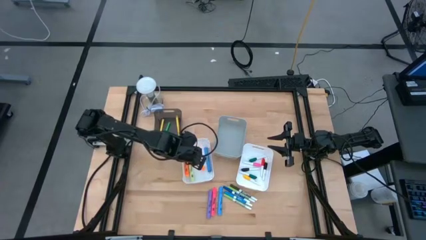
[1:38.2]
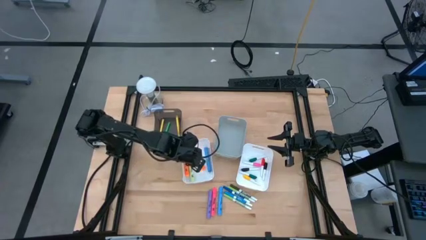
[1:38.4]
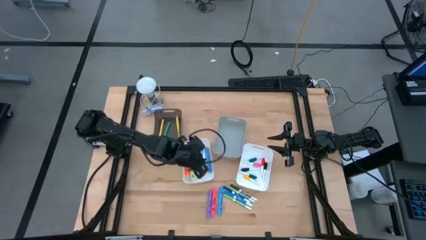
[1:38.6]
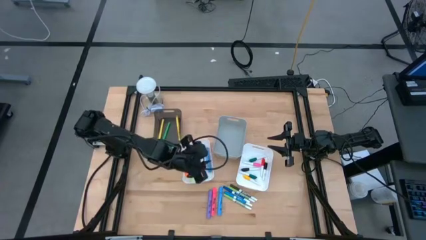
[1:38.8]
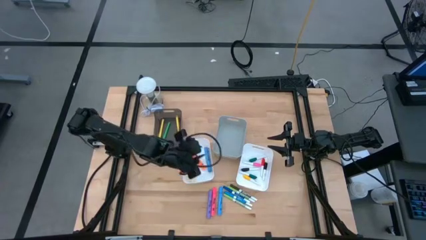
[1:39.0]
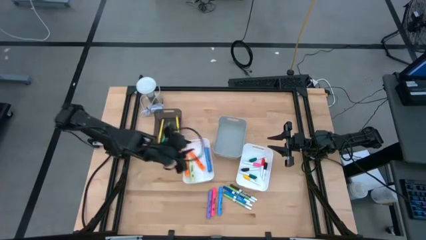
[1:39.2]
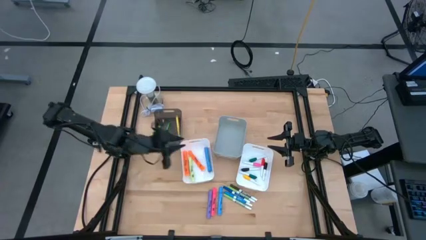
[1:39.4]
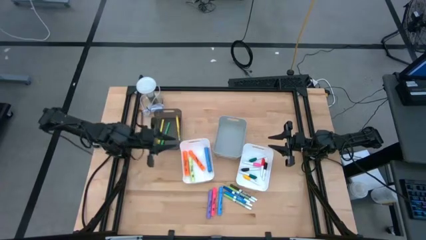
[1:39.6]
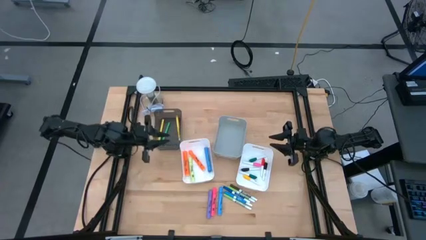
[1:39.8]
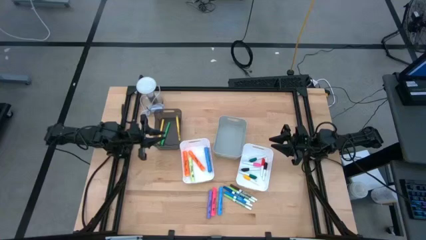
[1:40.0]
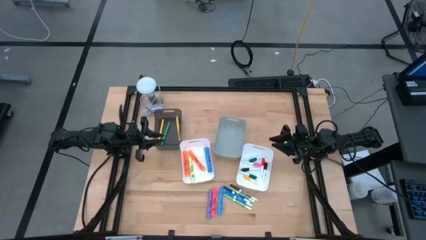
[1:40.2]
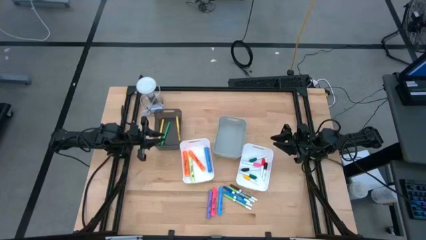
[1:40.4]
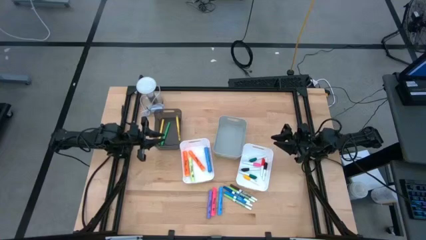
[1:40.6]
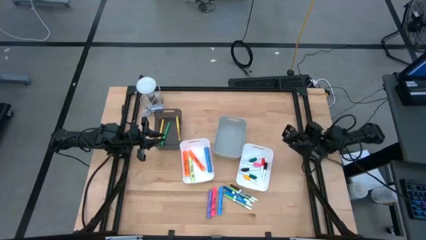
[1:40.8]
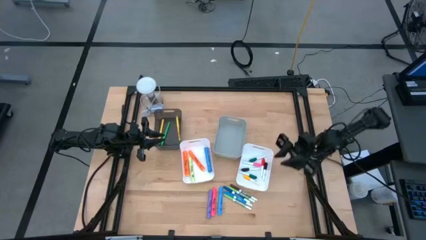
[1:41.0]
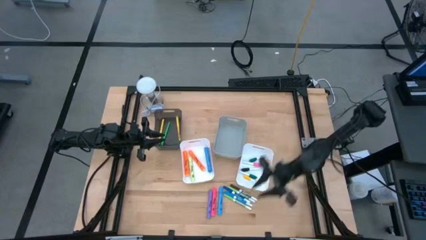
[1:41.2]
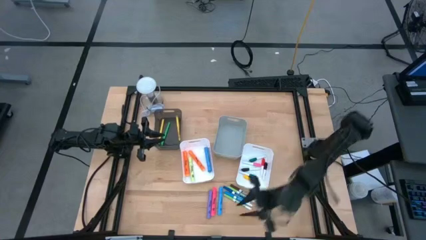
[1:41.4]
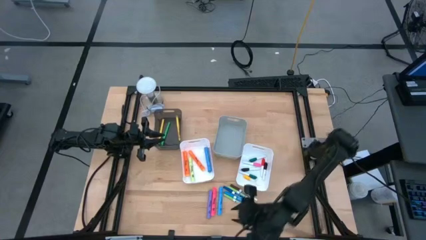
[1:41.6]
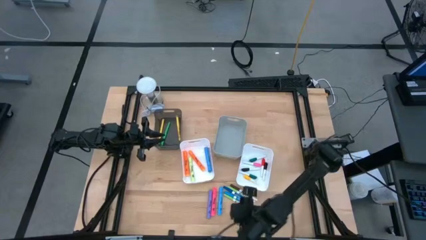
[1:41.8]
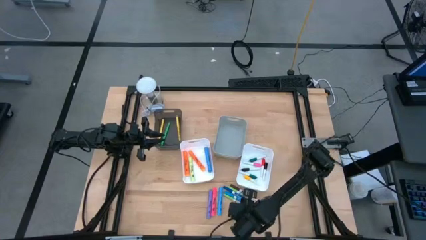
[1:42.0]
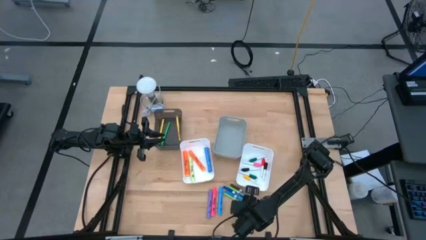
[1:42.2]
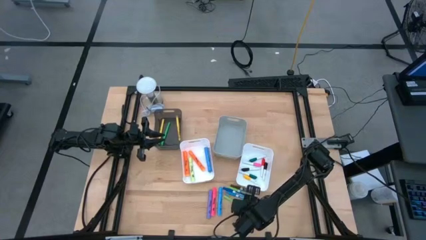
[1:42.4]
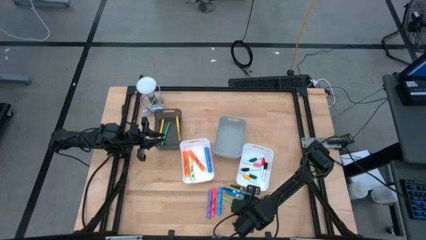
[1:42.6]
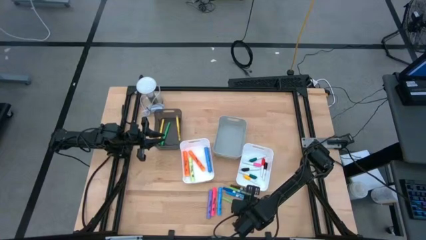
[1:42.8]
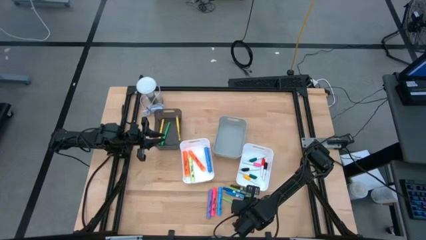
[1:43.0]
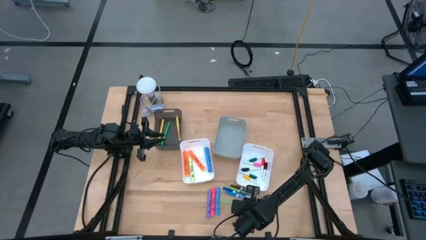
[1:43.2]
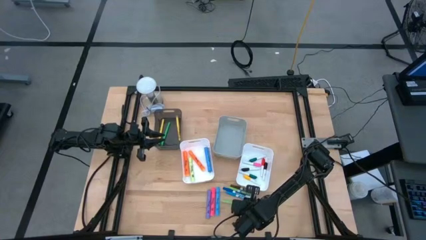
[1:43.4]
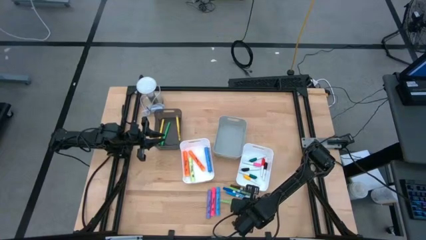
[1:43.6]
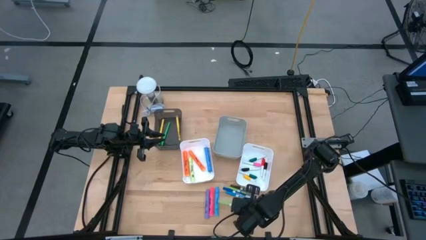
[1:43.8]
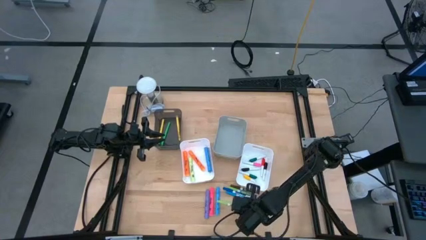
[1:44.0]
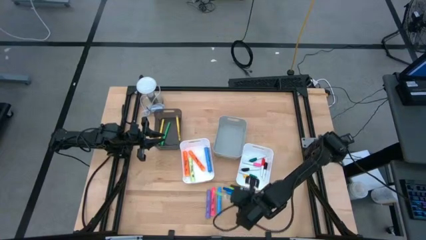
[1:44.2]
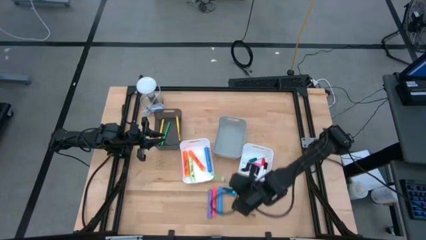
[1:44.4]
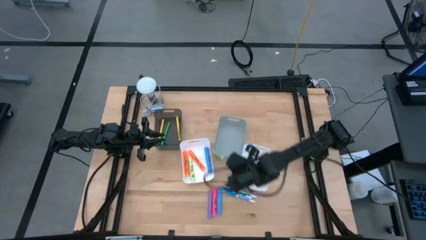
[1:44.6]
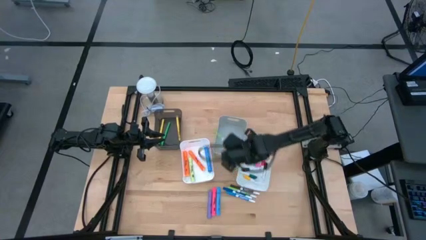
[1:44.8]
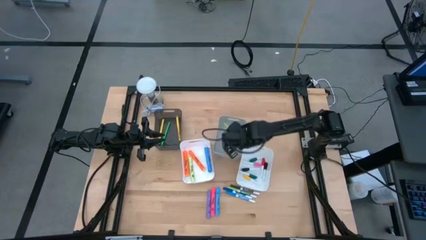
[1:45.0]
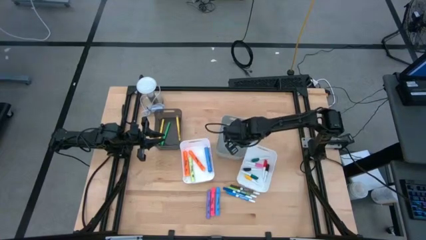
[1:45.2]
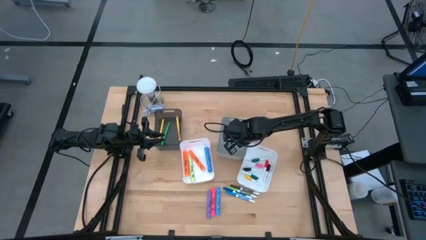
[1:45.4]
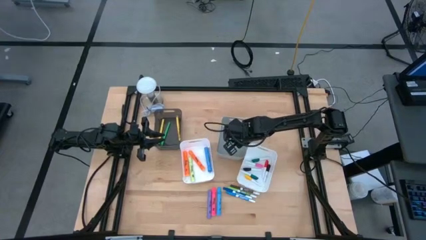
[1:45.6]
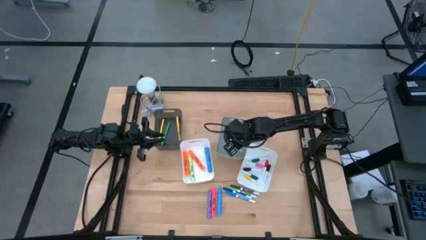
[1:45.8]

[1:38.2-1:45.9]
Task: Pick & Place Markers
Put the bottom green dry erase marker into the gray bin

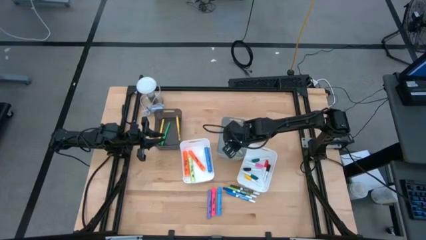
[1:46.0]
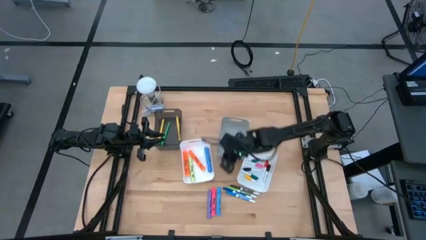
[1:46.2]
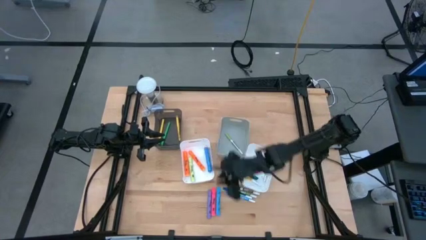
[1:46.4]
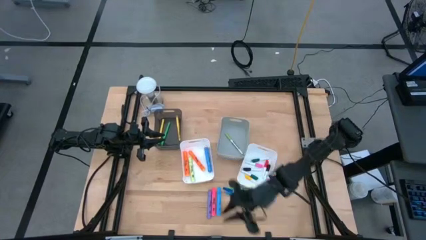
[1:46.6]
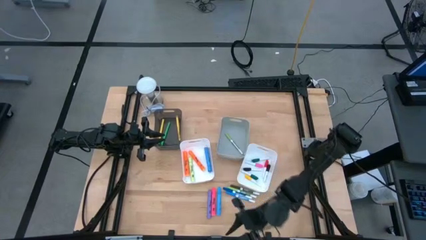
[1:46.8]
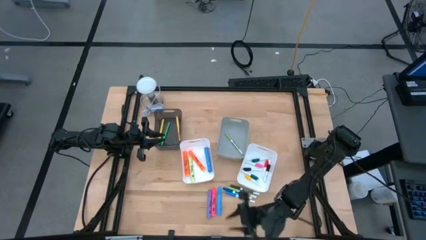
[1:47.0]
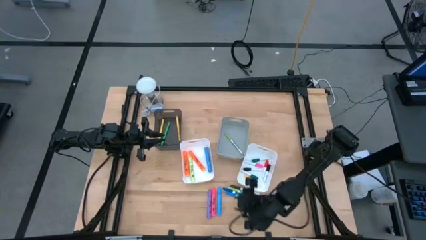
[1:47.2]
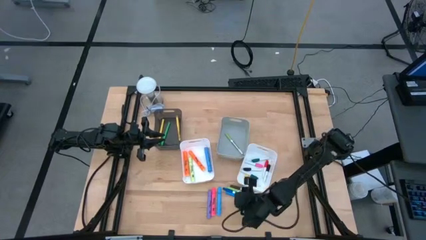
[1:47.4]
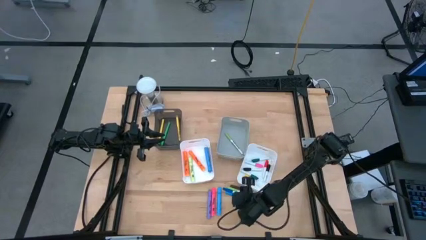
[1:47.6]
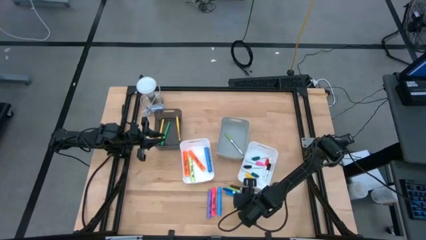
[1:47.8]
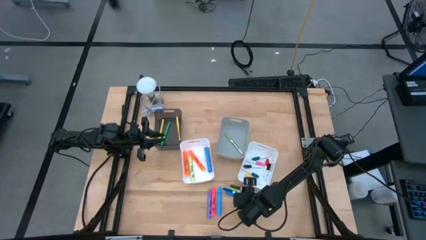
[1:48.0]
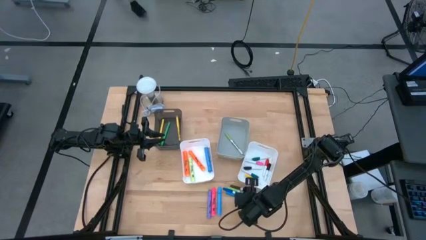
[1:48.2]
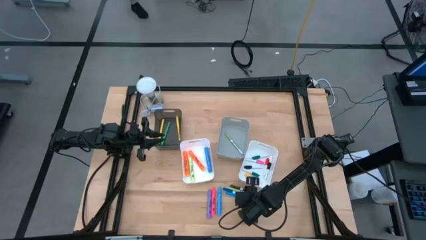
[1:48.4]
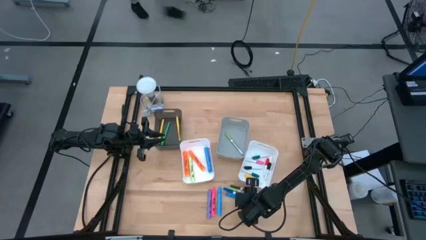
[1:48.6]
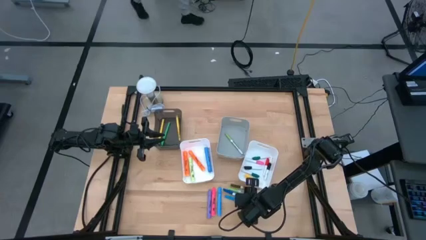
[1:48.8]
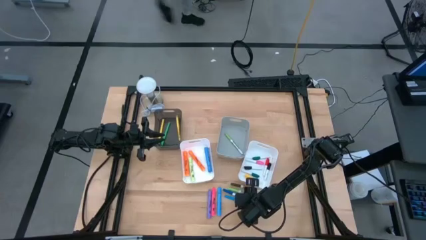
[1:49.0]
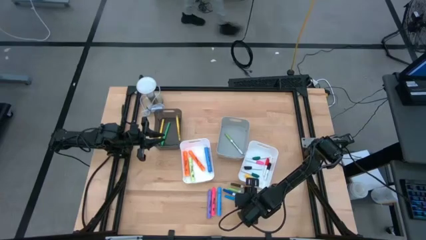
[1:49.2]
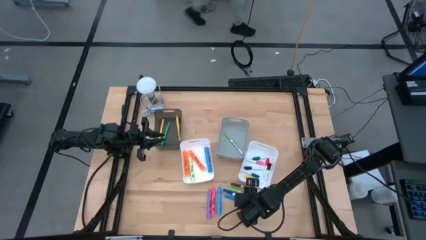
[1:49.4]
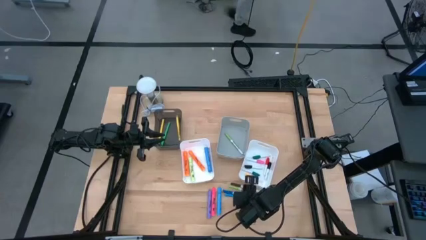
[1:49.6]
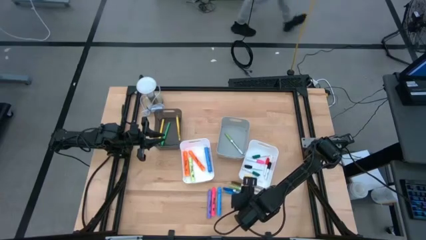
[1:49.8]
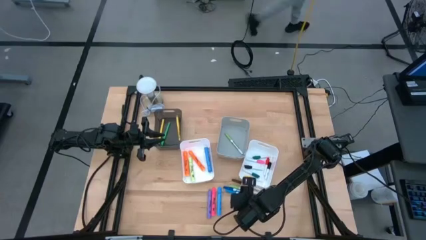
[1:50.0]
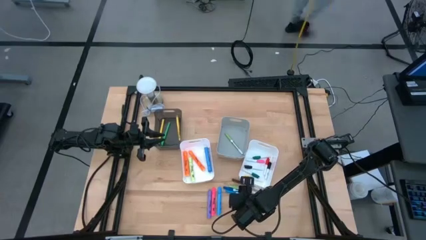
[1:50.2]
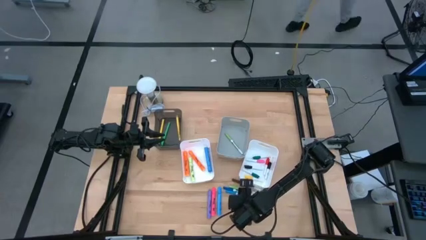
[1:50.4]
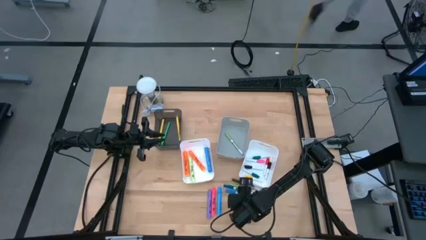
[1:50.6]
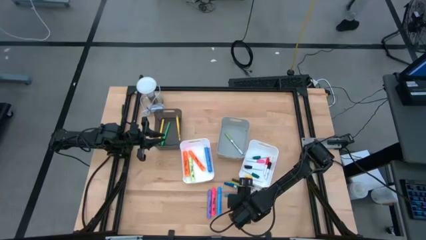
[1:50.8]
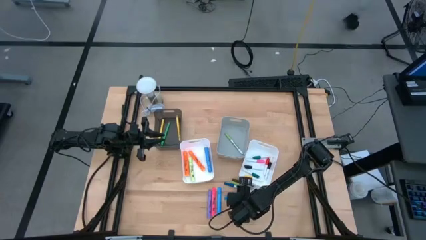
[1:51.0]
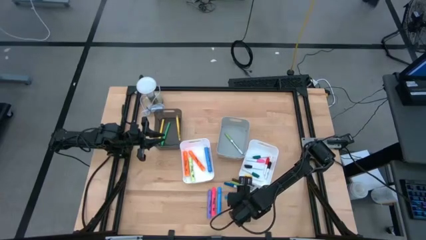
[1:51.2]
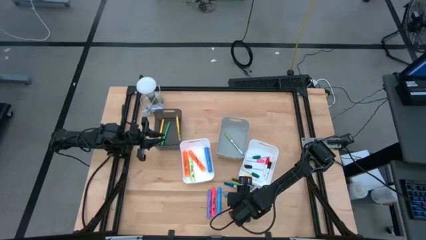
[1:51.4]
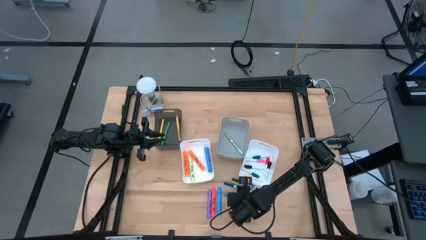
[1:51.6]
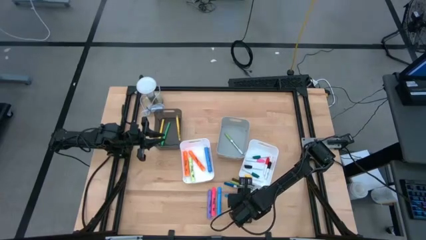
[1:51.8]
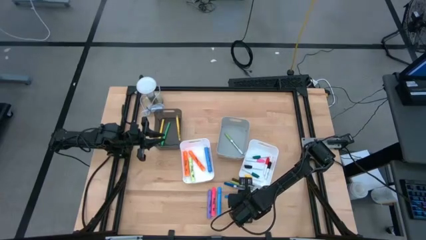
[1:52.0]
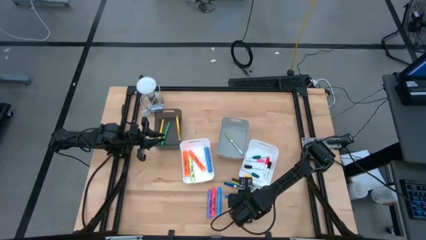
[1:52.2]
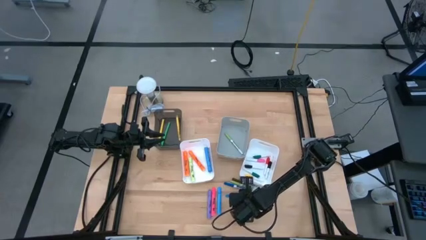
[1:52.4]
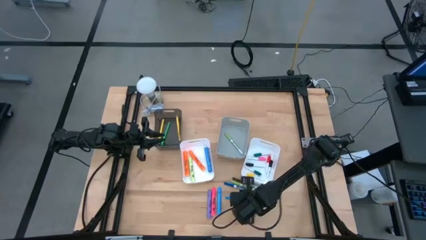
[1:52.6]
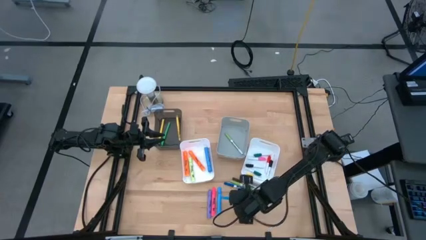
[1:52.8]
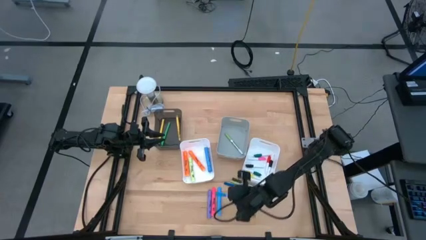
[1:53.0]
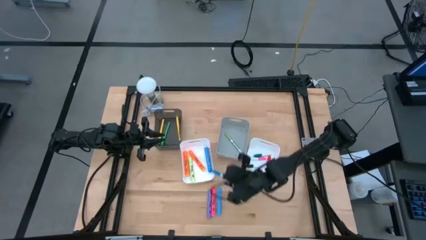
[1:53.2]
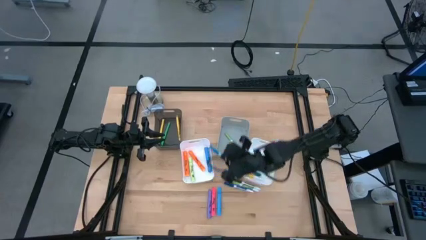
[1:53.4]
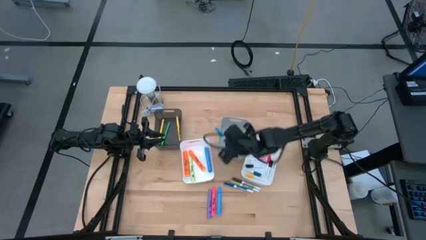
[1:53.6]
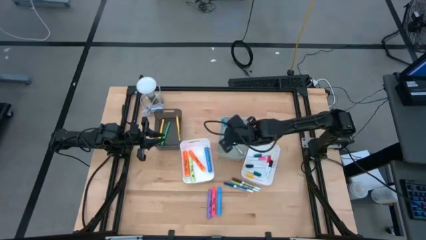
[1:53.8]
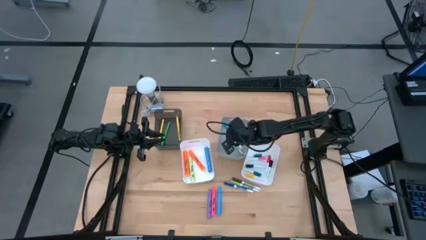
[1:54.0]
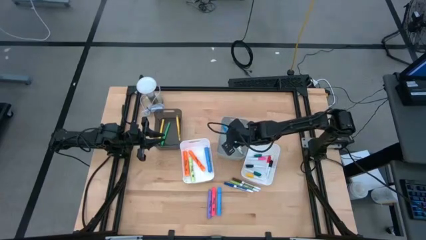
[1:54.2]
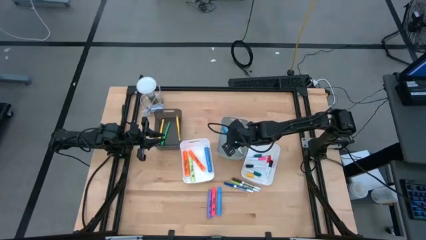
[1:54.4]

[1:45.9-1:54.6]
Put the light blue dry erase marker into the gray bin
